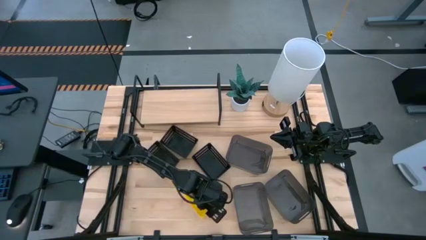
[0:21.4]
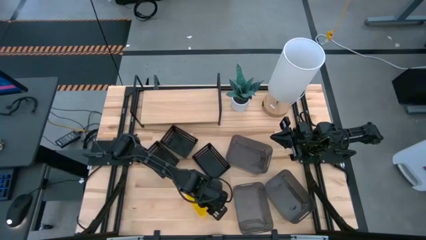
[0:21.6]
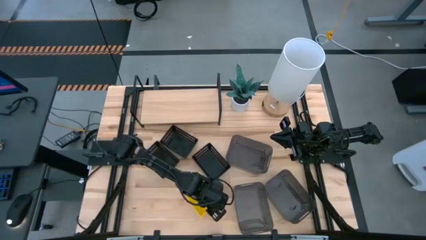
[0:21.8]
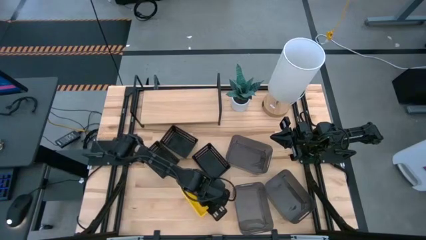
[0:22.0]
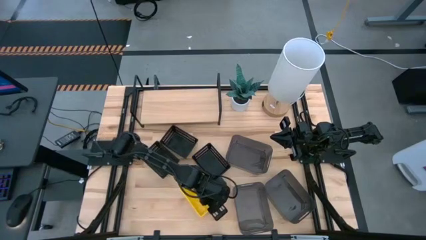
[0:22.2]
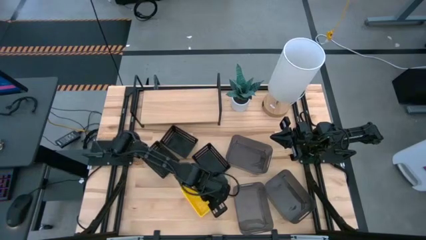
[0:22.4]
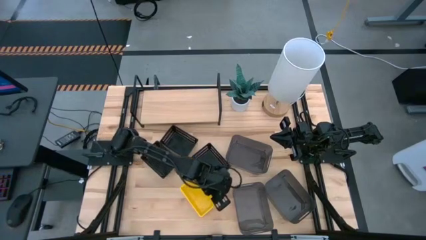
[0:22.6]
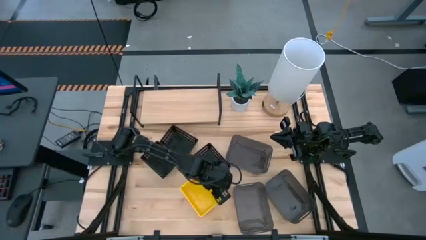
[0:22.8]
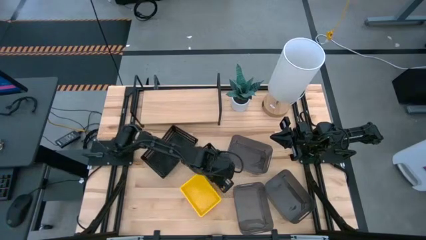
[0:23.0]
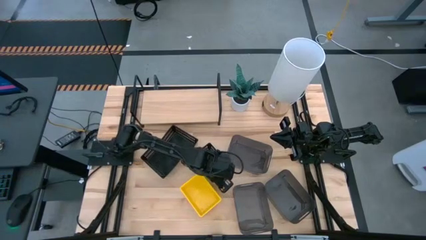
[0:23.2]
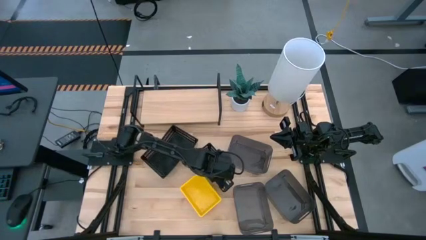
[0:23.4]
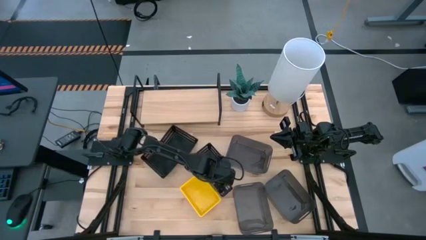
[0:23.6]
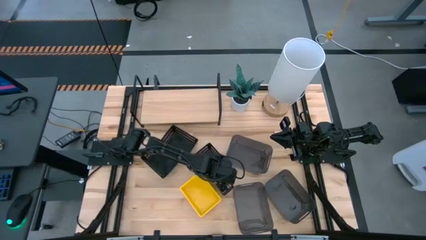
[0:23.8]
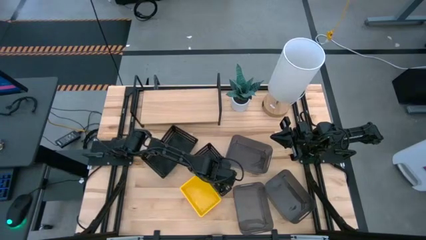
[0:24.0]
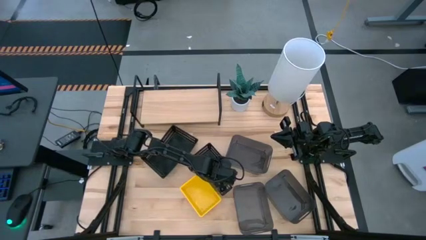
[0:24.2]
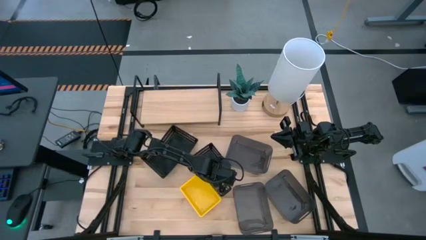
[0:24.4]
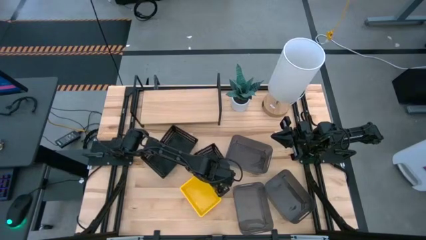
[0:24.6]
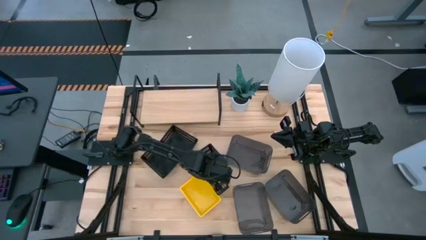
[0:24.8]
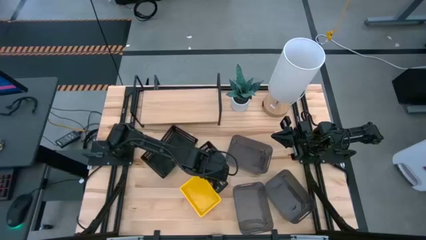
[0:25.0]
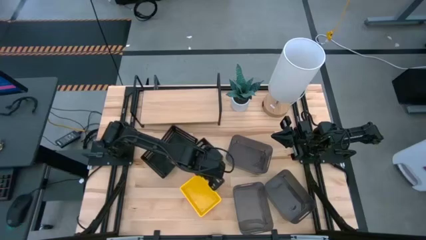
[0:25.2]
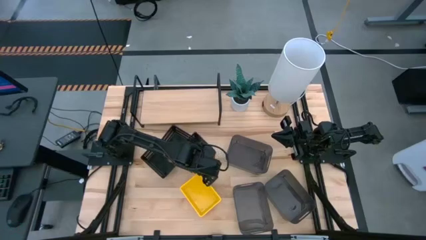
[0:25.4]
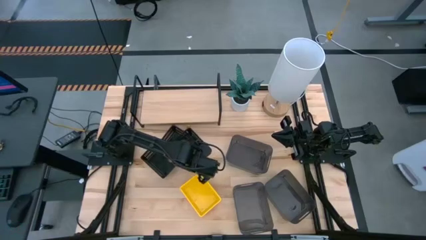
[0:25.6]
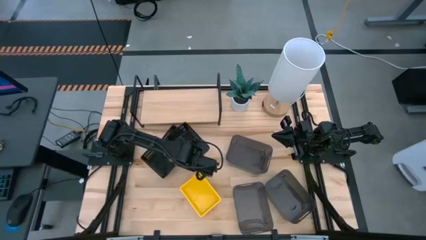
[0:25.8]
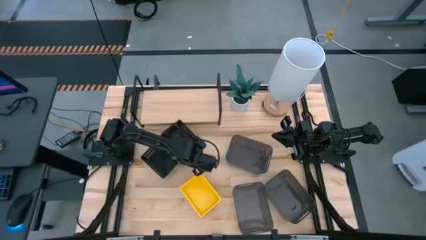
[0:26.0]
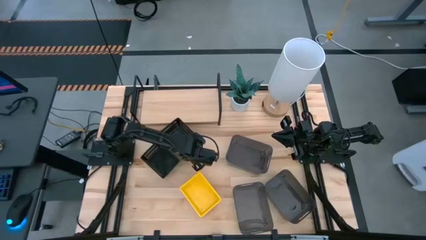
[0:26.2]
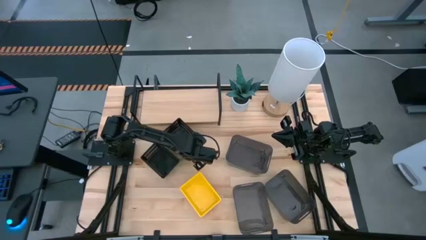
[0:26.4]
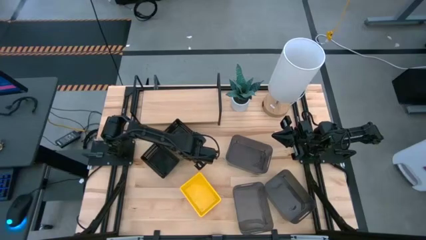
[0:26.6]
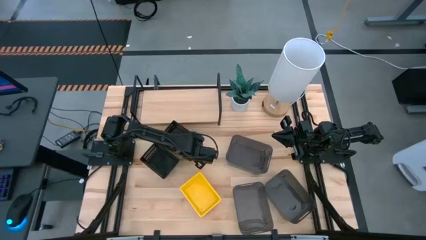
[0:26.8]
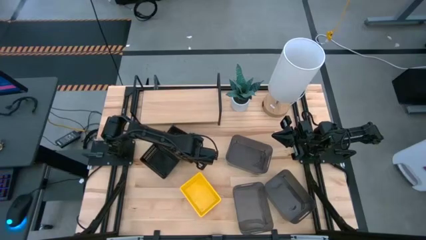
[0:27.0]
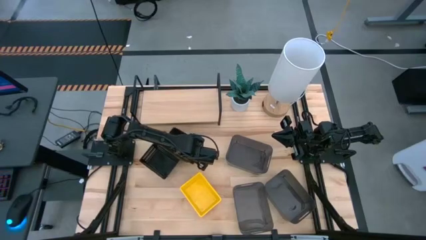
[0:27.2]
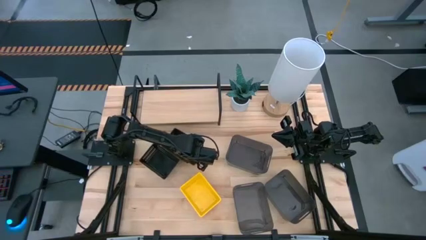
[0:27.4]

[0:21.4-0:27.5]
Task: Stack baskets on shelf by color
Stack the right black bin on top of the top black bin

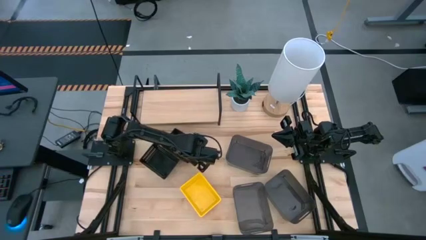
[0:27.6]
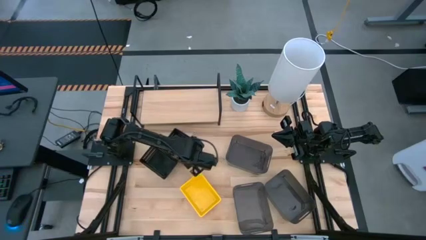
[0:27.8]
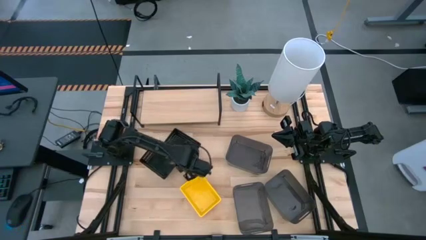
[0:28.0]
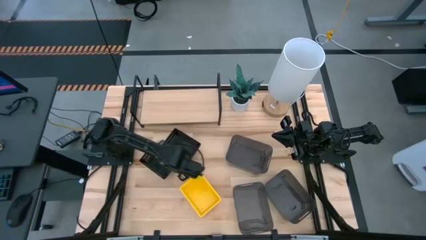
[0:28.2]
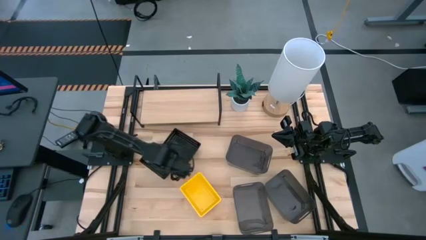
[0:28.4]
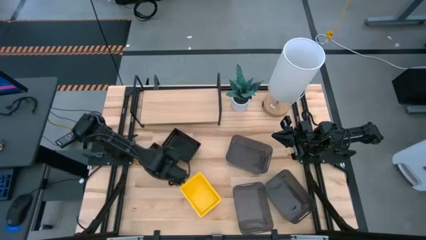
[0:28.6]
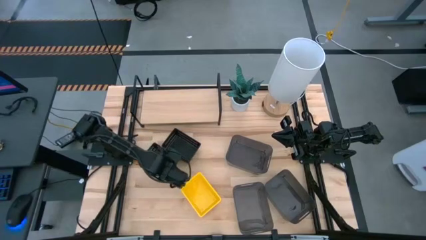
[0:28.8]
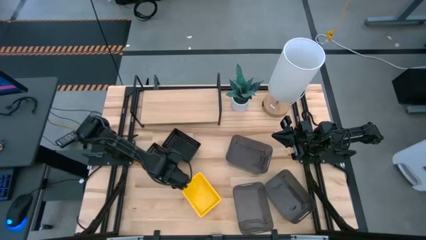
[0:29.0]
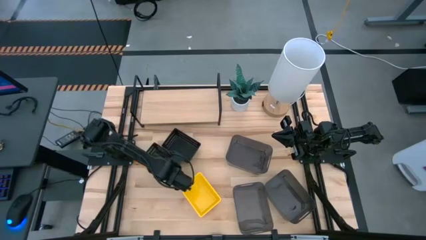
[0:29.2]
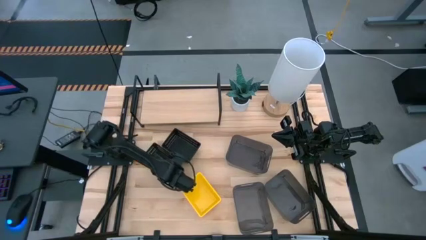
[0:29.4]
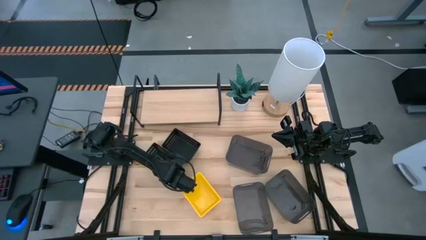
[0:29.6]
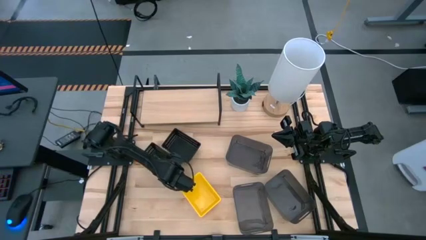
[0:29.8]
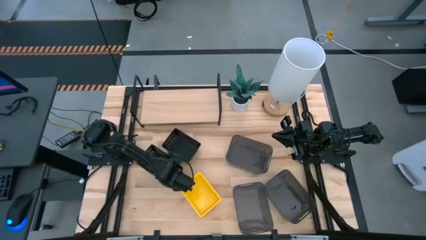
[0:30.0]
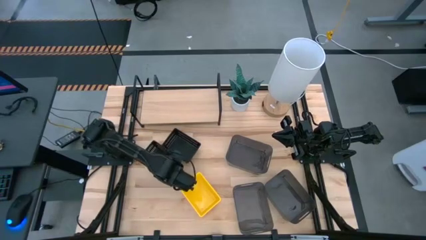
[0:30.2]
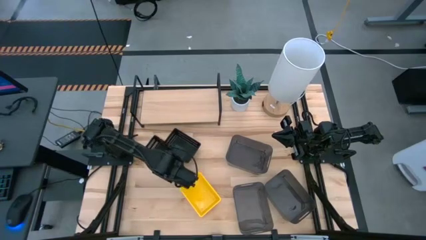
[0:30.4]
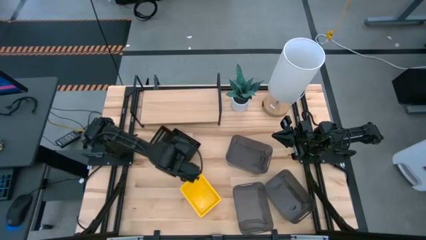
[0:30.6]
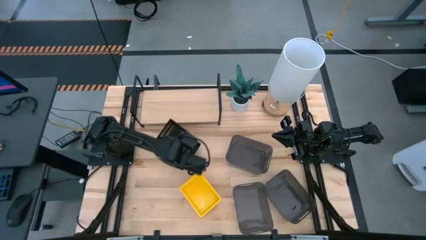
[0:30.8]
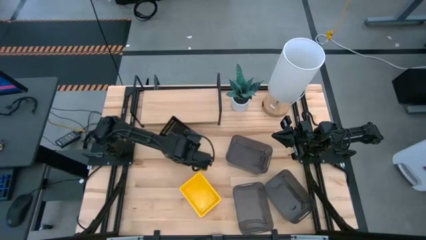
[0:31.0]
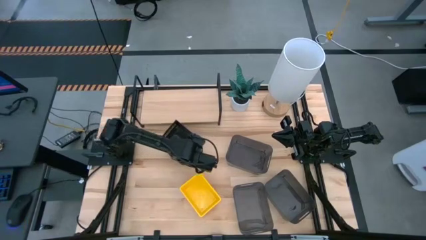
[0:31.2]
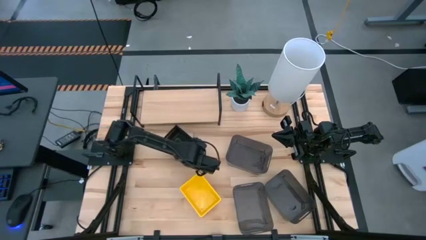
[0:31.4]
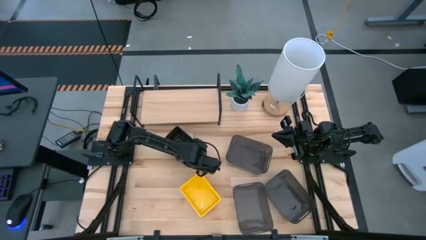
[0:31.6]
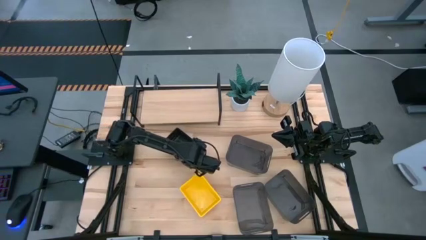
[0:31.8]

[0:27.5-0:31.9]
Stack the bottom black bin on top of the top black bin

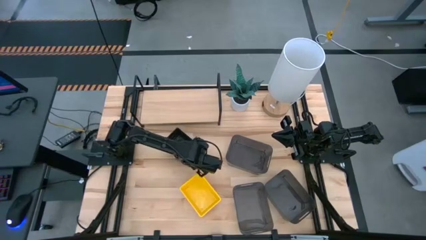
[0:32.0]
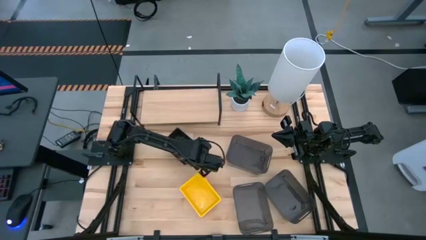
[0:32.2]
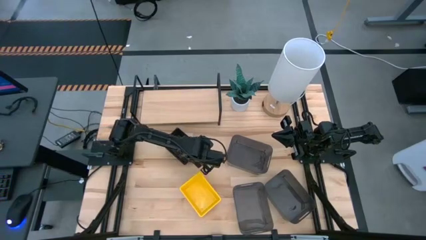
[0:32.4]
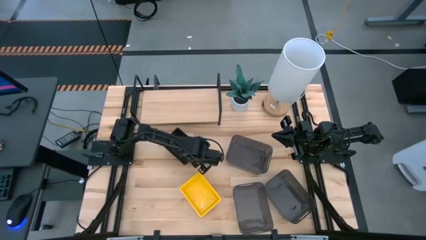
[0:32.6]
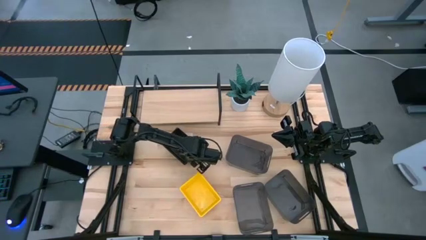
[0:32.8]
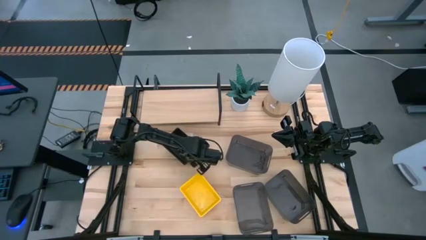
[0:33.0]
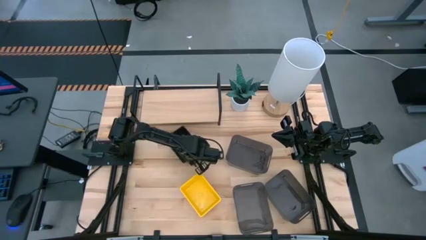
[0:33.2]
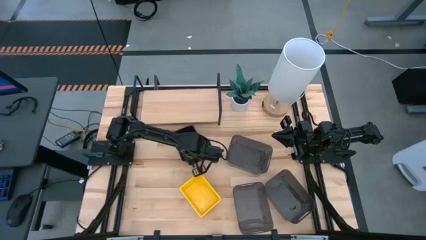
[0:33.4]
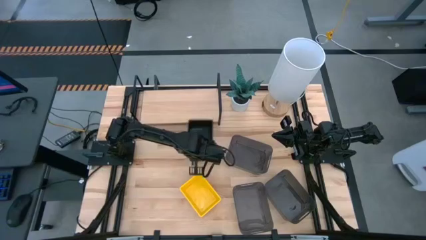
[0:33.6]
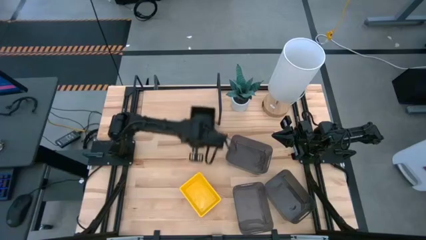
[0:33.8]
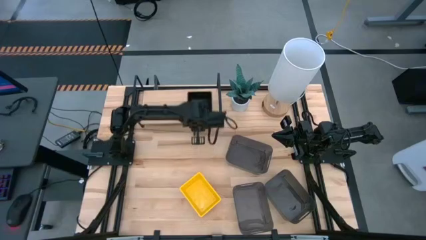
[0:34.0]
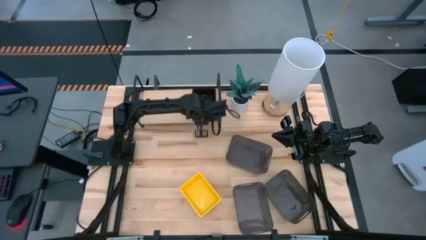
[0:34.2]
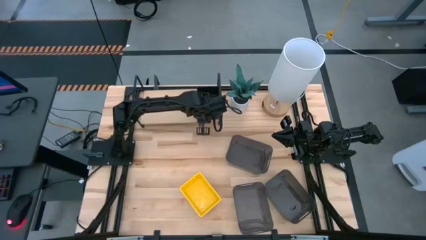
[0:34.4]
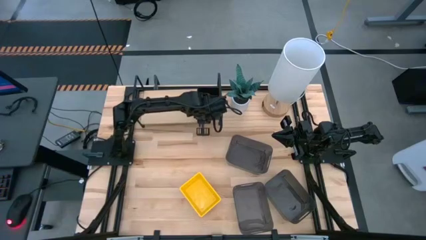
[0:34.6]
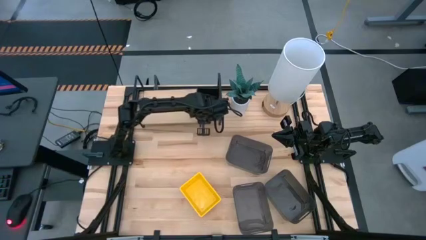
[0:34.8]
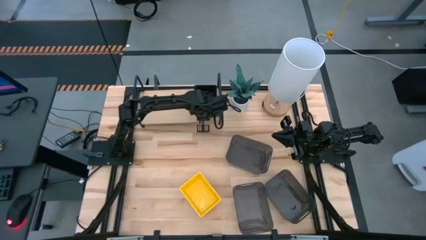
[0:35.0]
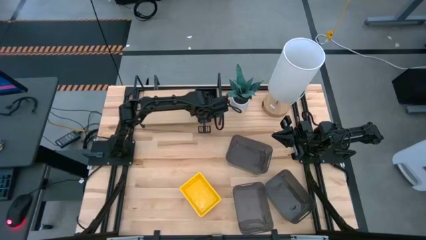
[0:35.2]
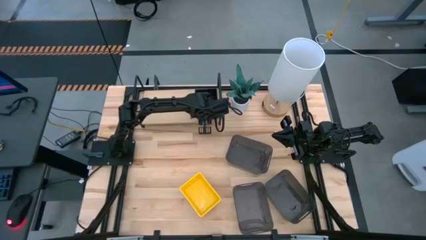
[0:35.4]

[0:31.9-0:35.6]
Put the stacked black bins on the shelf

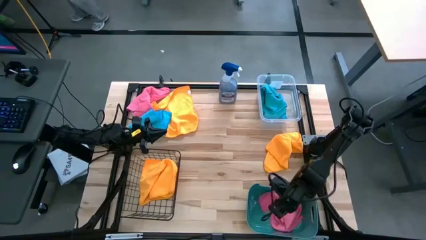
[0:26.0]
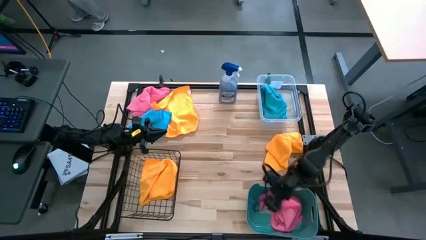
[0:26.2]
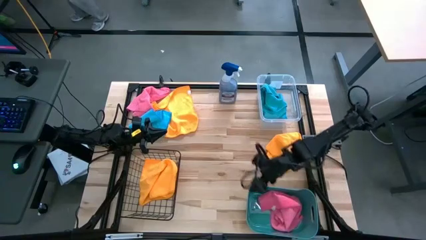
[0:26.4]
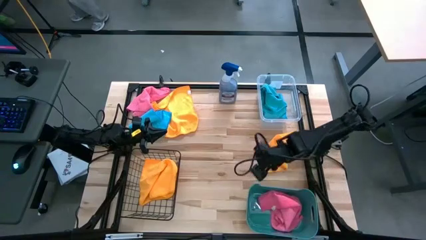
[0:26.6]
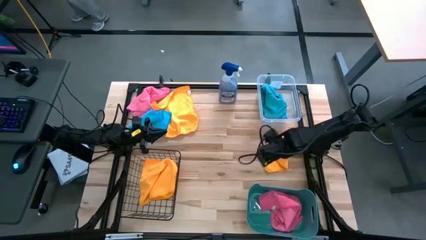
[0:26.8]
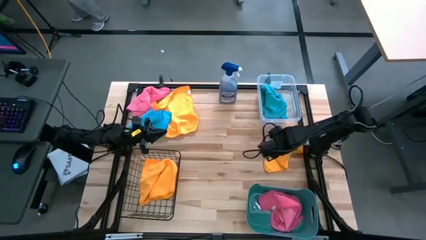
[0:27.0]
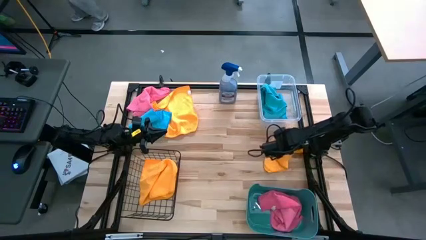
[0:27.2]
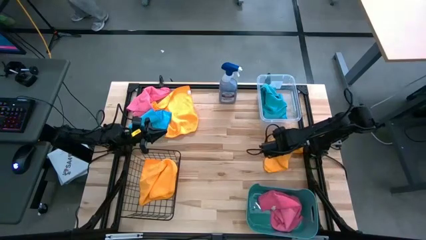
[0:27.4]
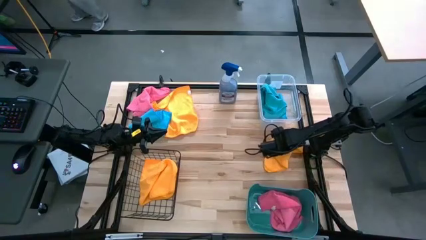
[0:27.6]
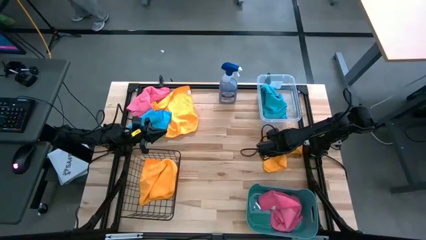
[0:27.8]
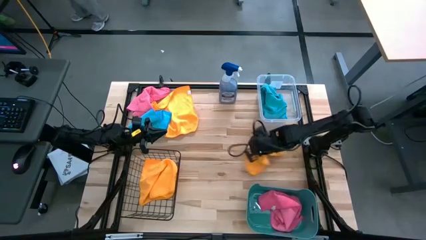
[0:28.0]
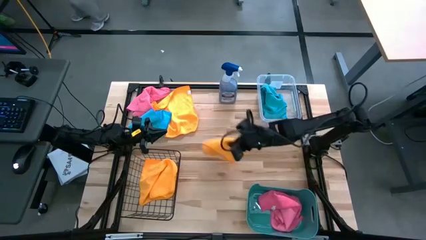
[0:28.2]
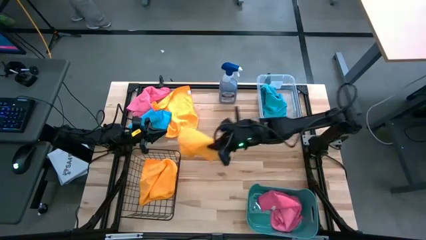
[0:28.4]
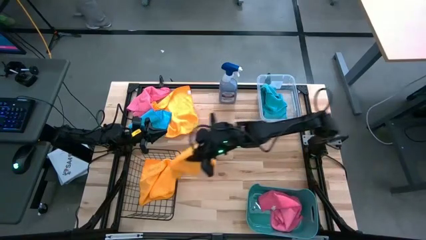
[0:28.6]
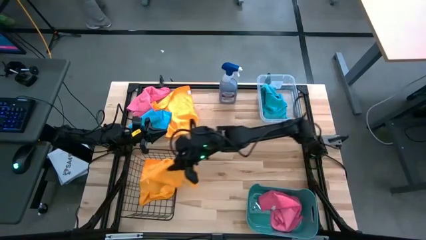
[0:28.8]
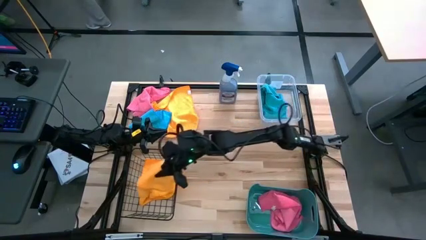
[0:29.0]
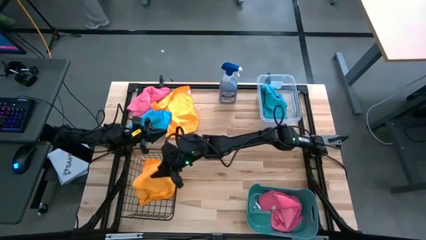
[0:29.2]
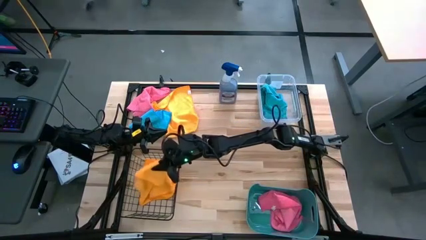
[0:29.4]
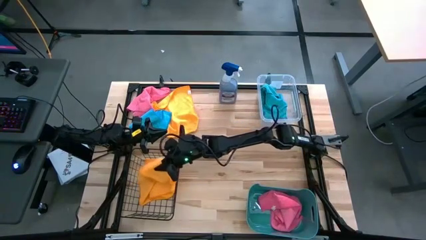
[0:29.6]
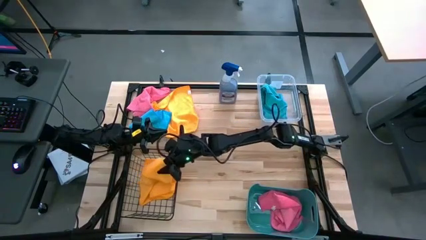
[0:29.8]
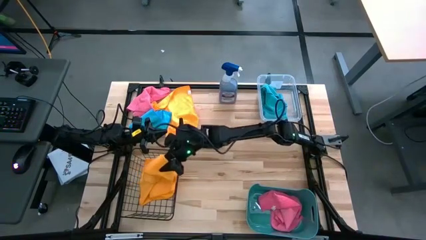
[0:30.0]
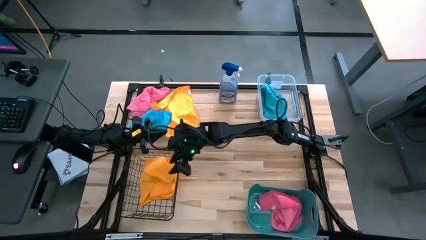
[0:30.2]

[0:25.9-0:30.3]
Task: Sort microfiber towel by color & place in baskets
Put the right orange microfiber towel into the black wire basket
